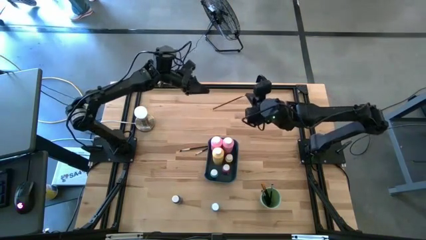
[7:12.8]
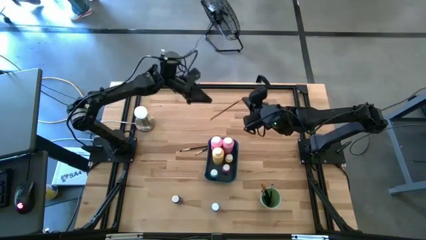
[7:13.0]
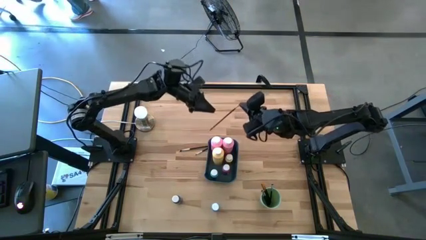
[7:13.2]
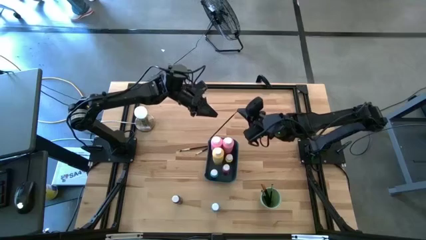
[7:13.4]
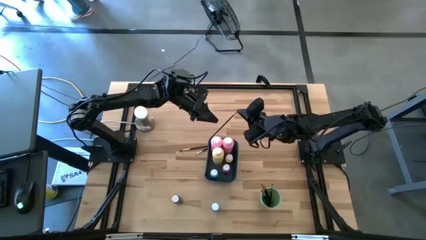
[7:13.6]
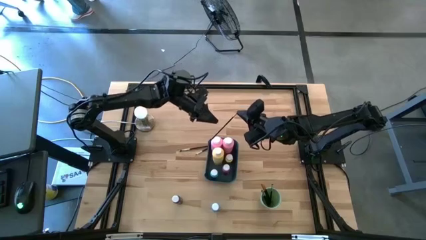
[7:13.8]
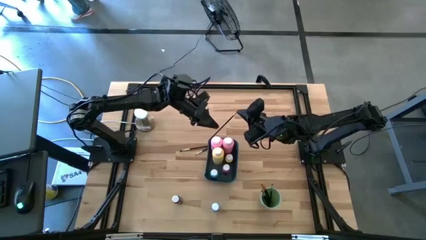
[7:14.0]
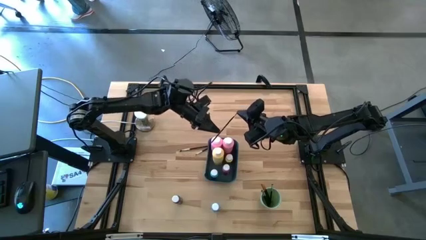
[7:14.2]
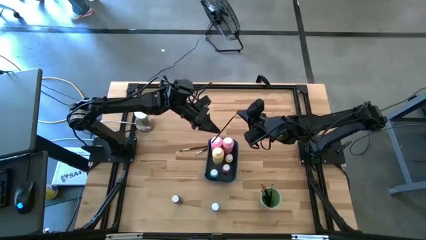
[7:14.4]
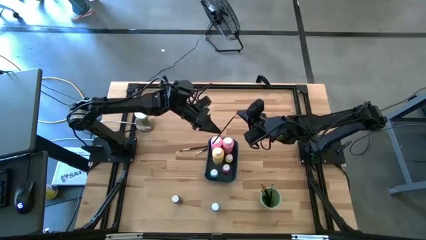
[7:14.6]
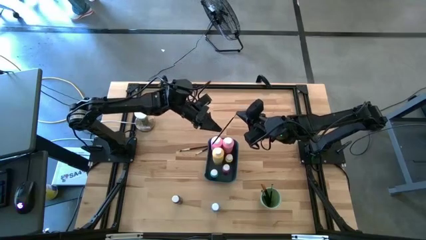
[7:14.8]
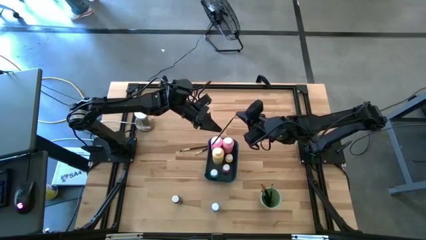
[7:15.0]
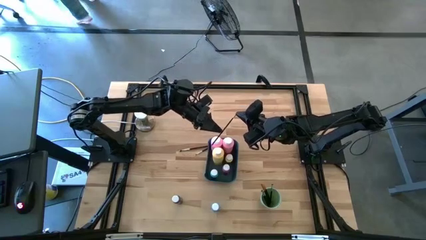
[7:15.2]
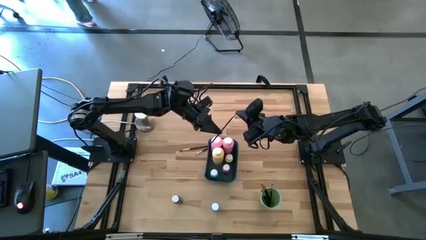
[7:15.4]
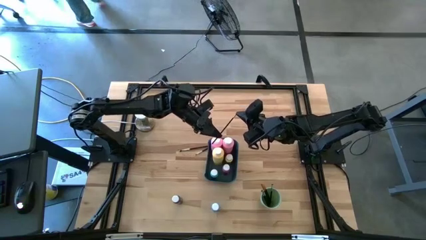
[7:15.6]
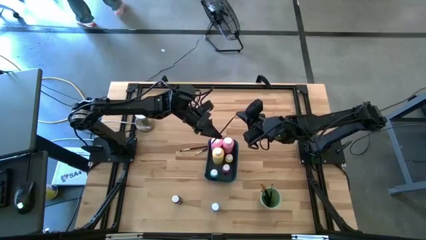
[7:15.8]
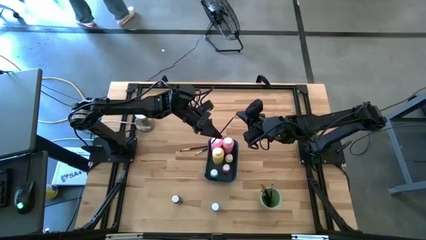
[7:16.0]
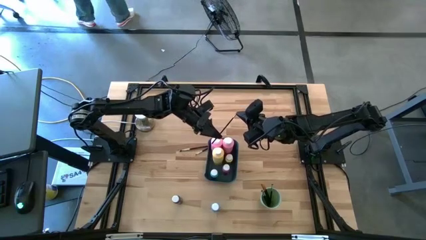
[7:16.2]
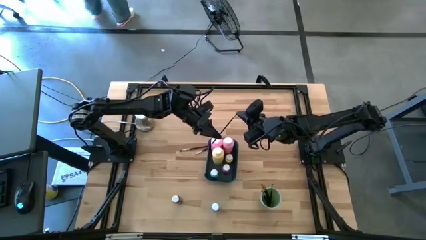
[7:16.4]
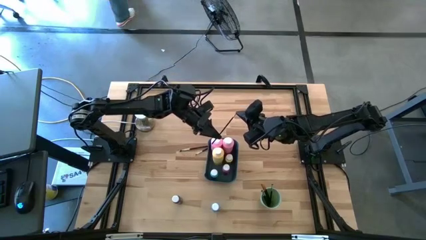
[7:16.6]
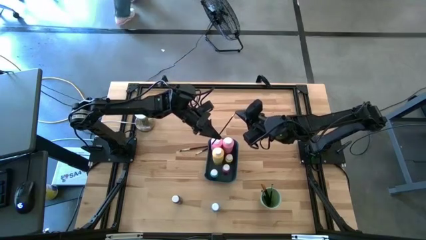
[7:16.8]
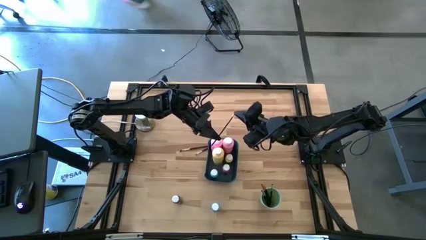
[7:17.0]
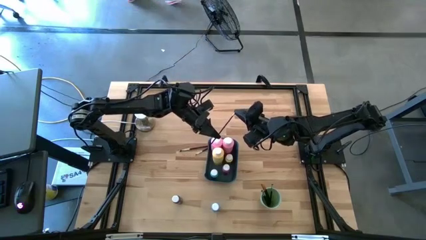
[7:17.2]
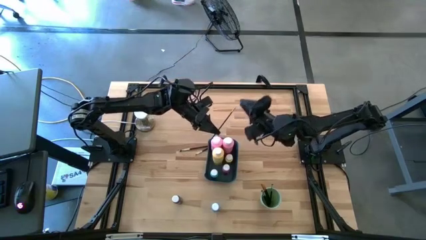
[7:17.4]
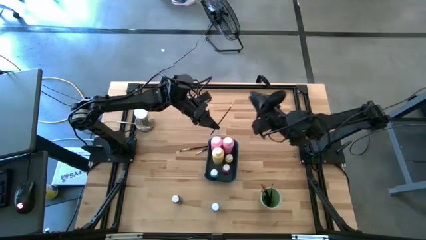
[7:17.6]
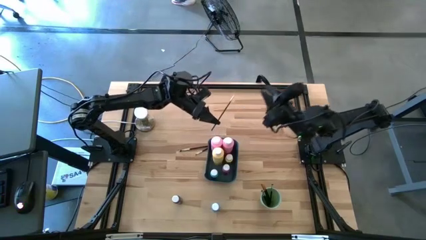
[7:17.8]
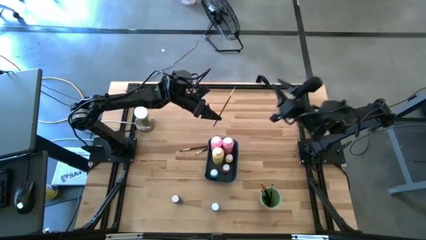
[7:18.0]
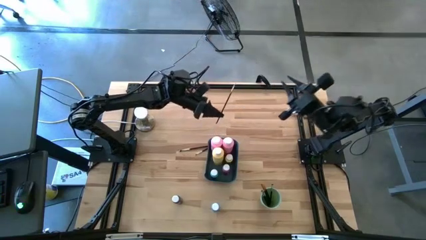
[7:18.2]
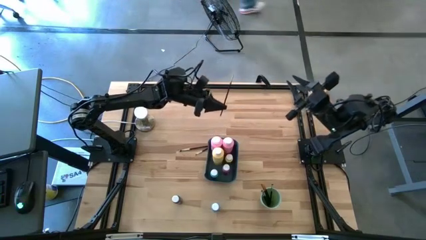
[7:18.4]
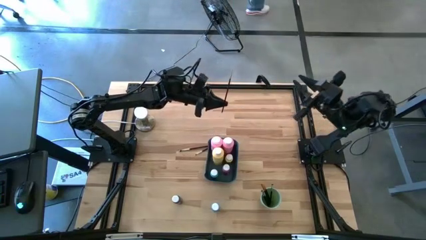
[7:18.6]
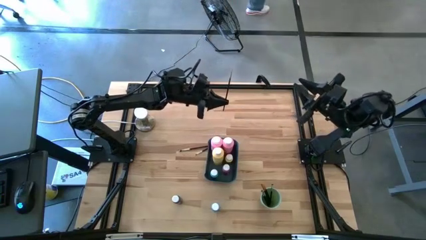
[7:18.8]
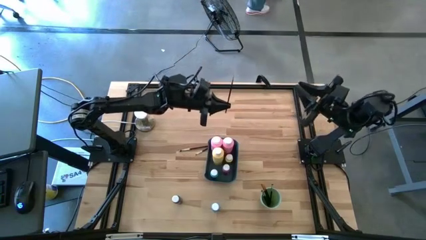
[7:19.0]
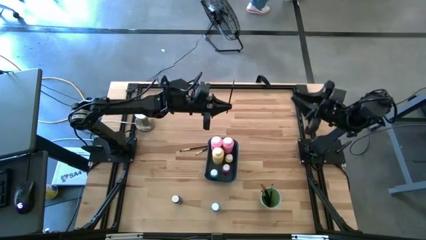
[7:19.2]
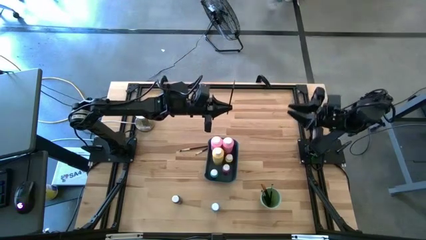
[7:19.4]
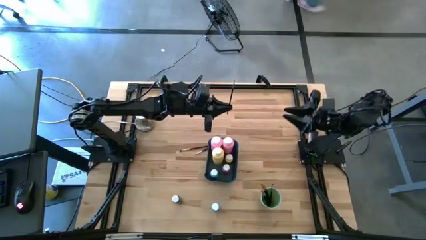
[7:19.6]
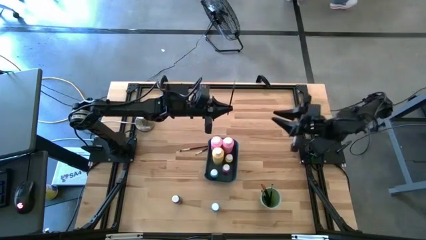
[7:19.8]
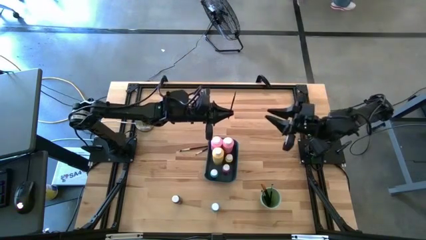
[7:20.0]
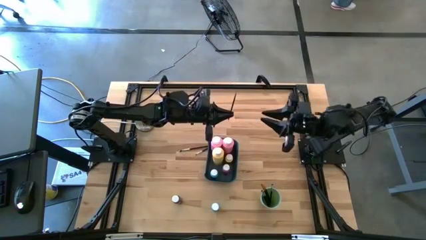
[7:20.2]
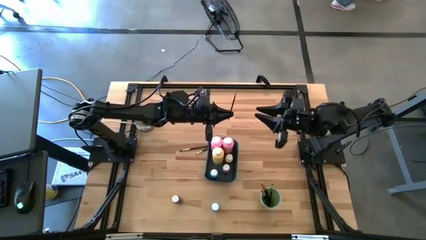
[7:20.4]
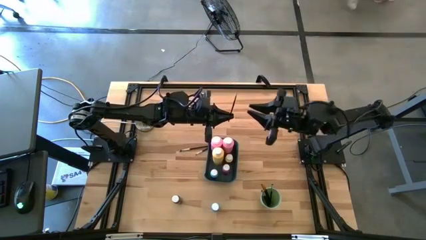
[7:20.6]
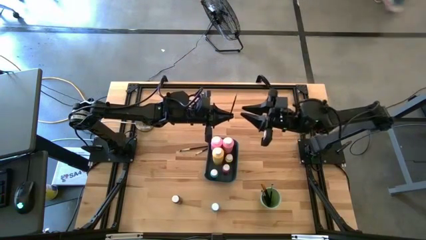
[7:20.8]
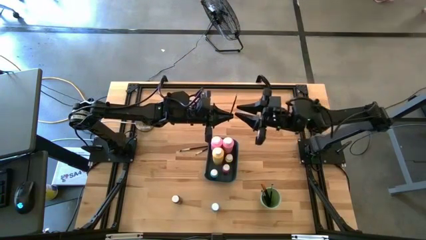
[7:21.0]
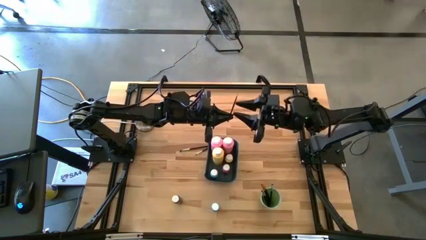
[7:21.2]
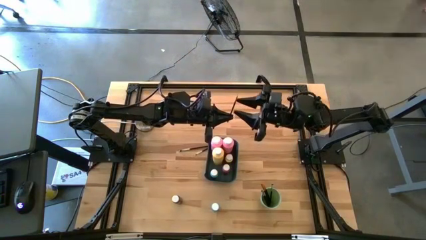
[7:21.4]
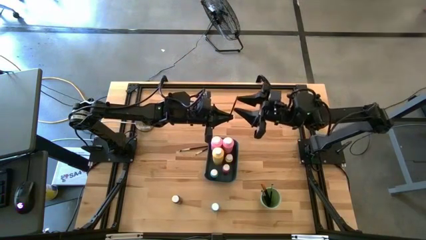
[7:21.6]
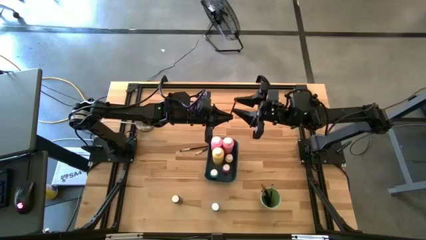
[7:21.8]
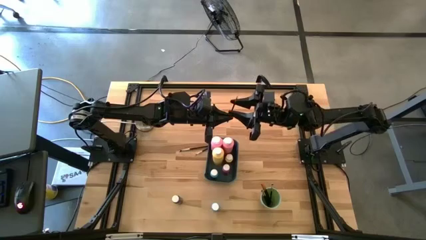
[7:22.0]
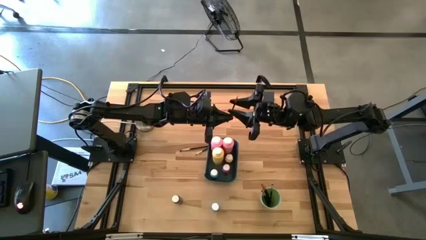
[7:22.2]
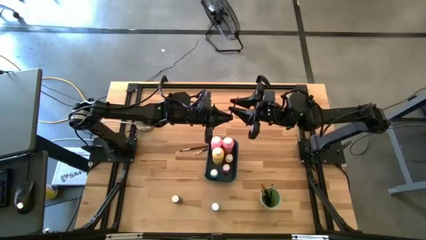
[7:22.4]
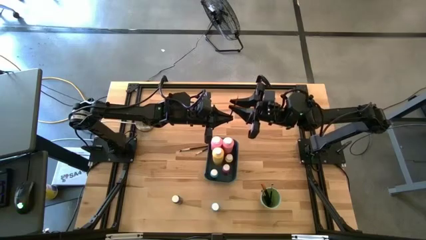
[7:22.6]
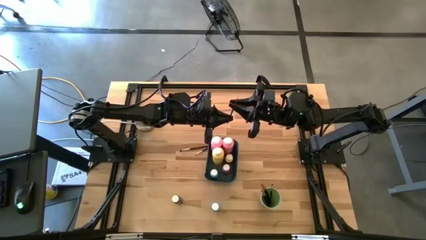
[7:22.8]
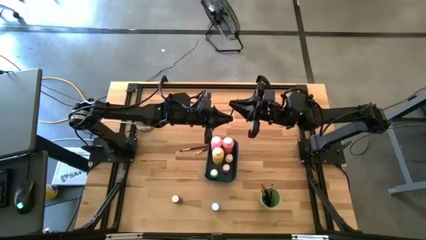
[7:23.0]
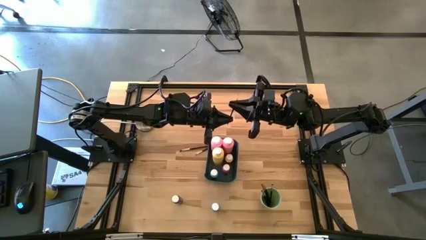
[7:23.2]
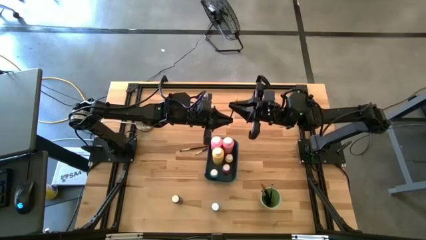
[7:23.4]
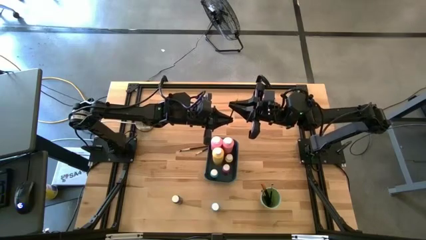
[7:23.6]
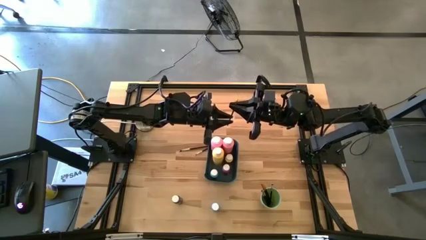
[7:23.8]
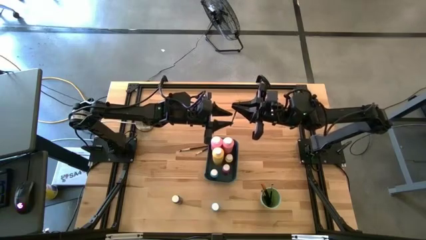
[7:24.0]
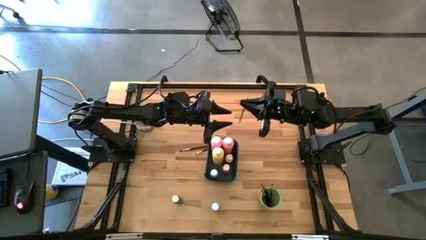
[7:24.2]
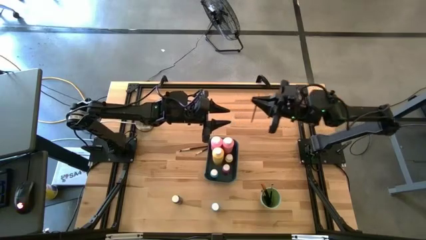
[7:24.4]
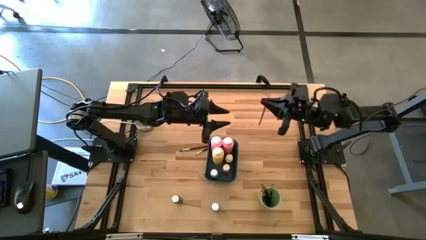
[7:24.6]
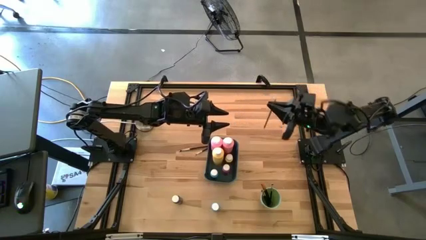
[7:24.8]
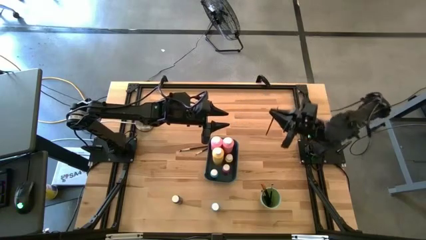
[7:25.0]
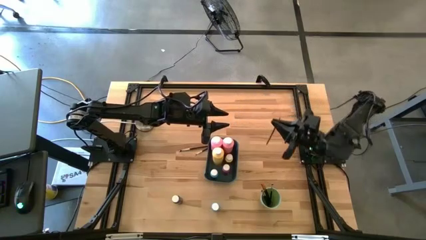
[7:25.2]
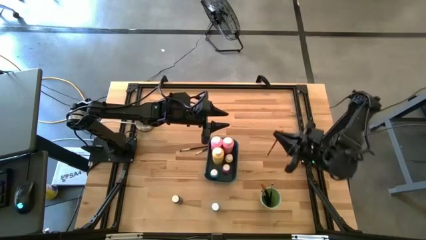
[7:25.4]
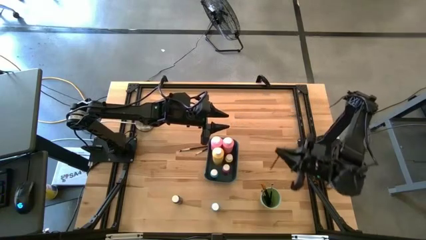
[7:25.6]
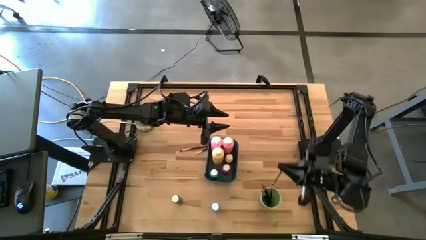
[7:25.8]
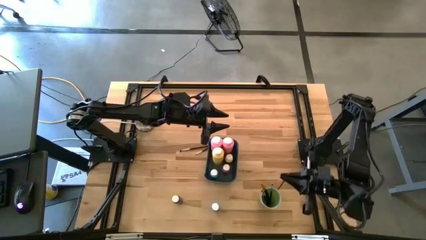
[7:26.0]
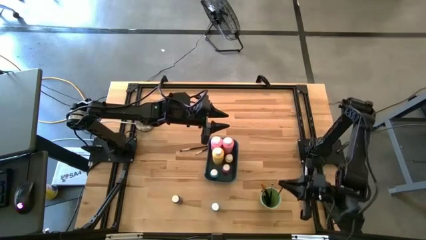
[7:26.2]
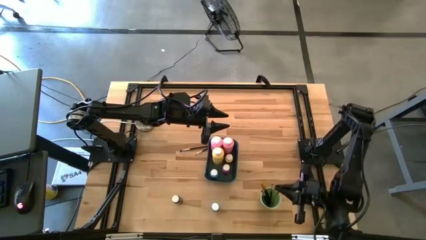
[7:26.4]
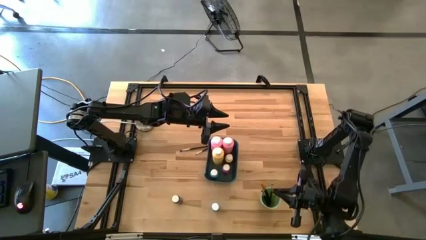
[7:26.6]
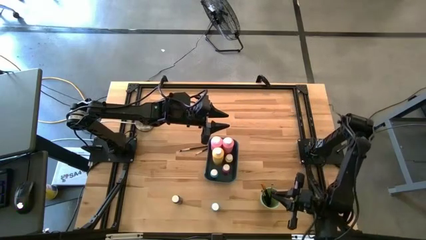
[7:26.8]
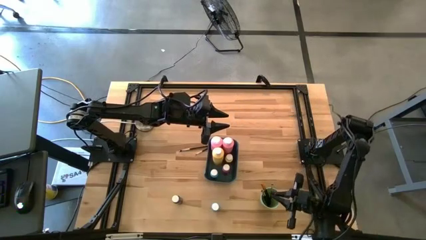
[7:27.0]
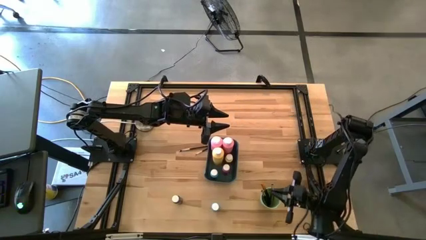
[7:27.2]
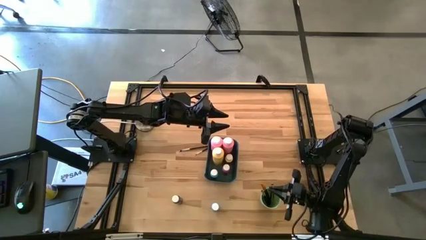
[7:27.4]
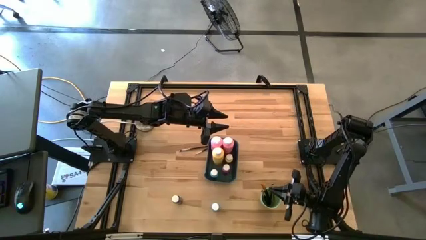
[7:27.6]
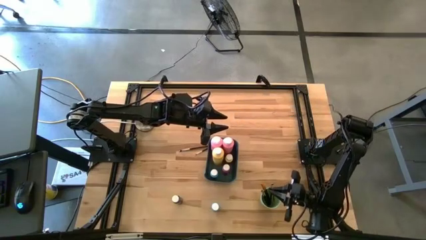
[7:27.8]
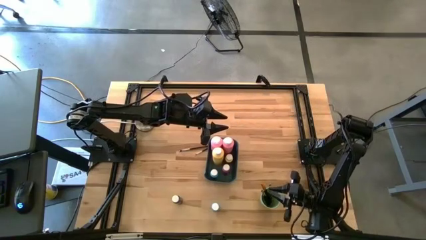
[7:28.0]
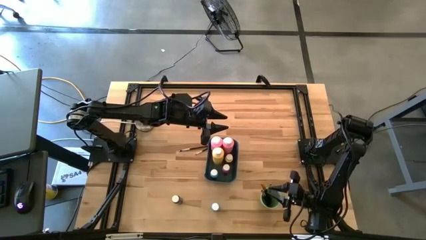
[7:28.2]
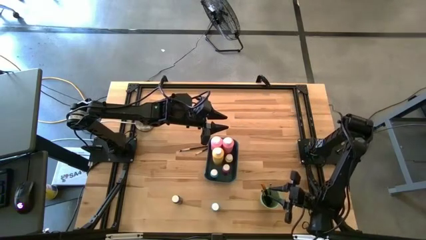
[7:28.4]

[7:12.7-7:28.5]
Task: Pick & Place Paint Supplies
Put the black and gold paint brush into the green cup
